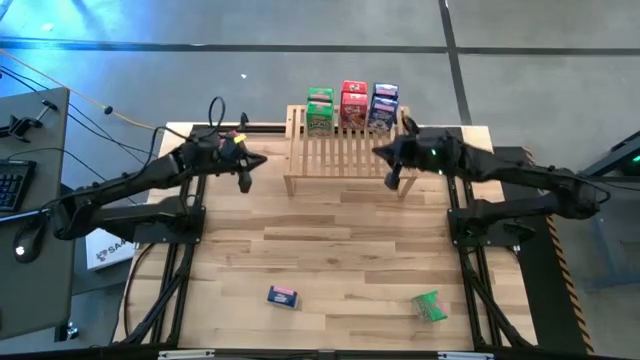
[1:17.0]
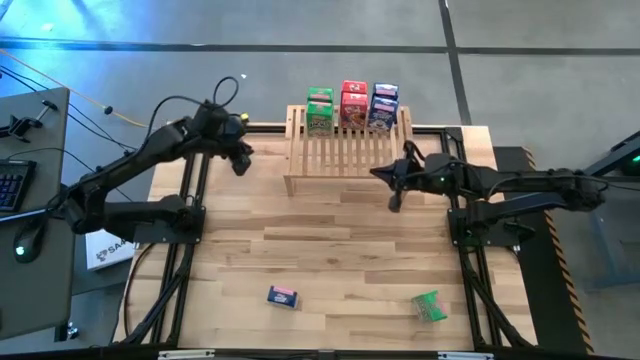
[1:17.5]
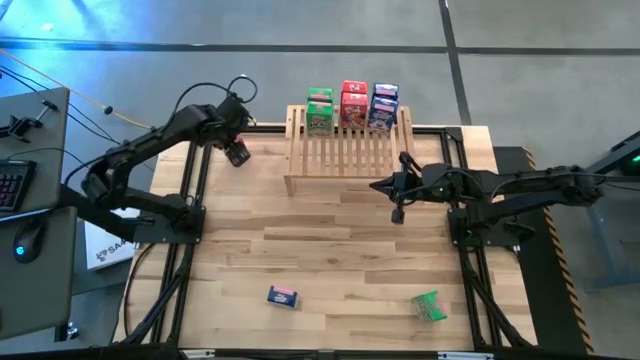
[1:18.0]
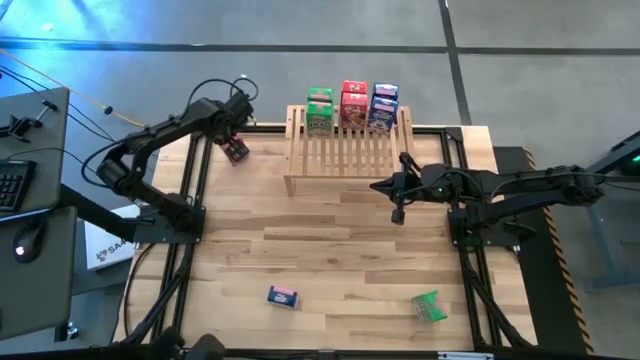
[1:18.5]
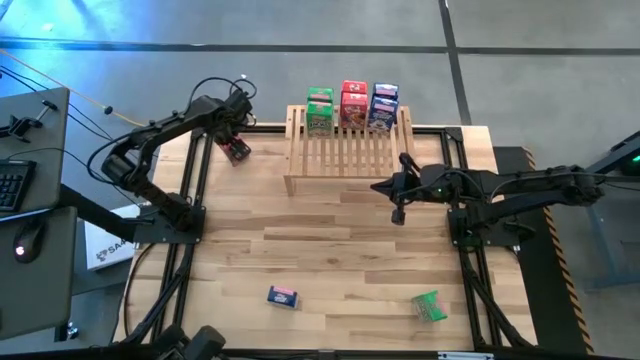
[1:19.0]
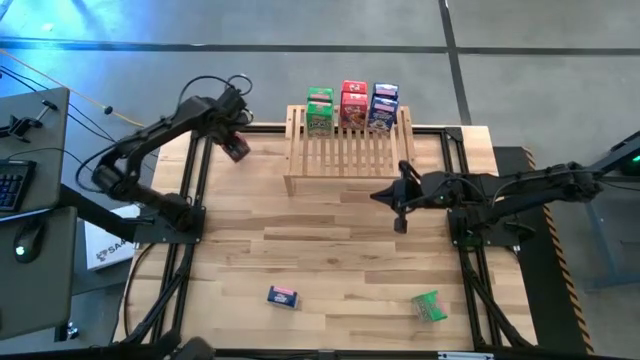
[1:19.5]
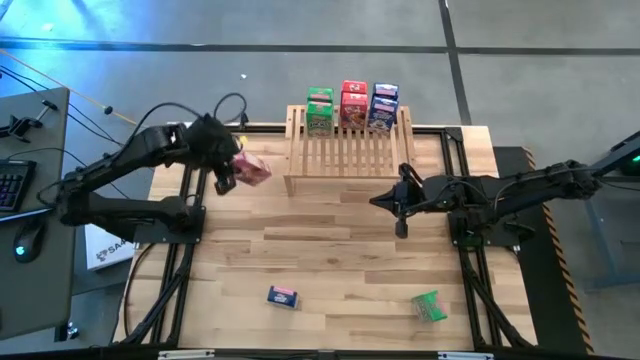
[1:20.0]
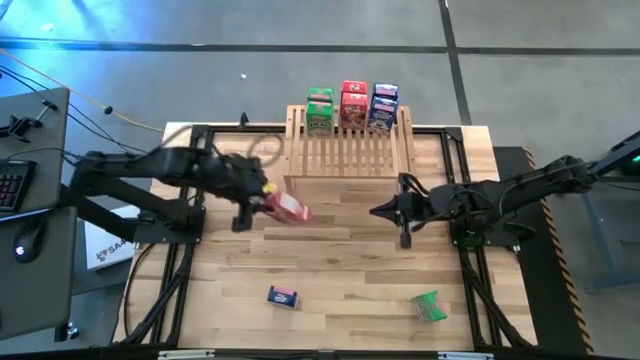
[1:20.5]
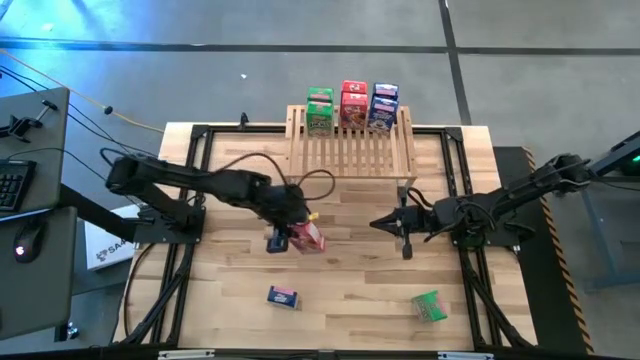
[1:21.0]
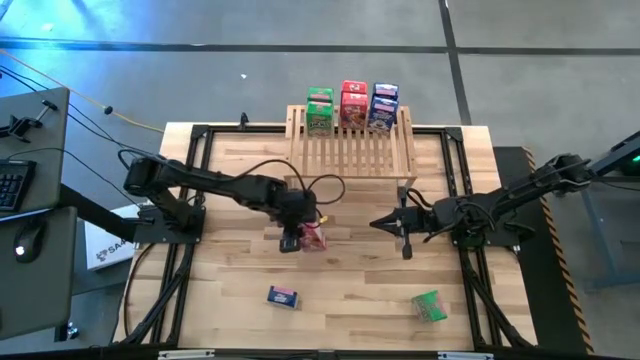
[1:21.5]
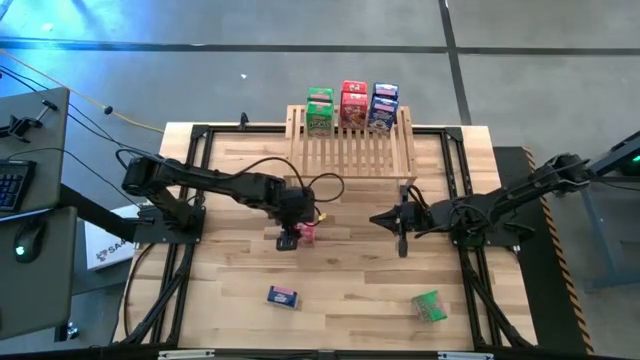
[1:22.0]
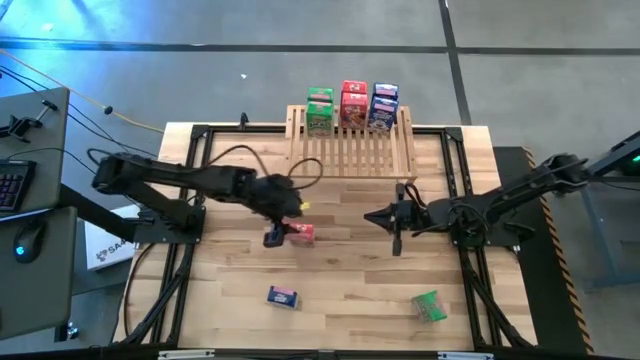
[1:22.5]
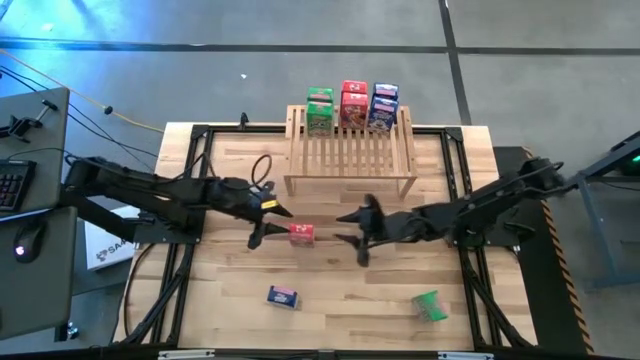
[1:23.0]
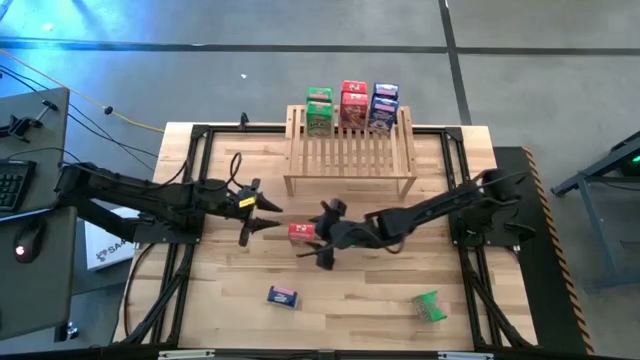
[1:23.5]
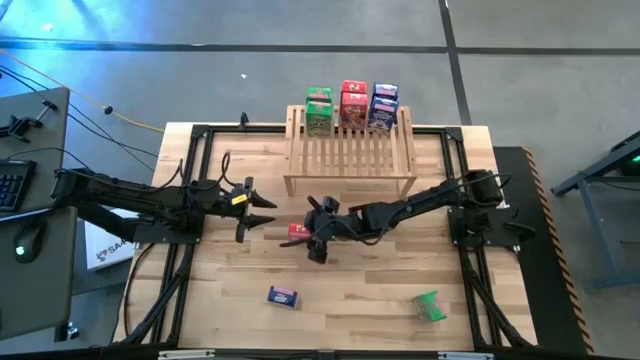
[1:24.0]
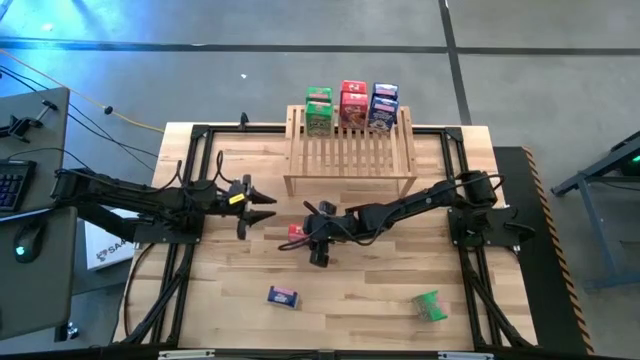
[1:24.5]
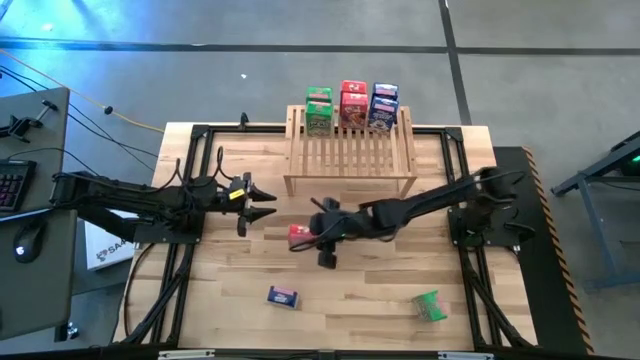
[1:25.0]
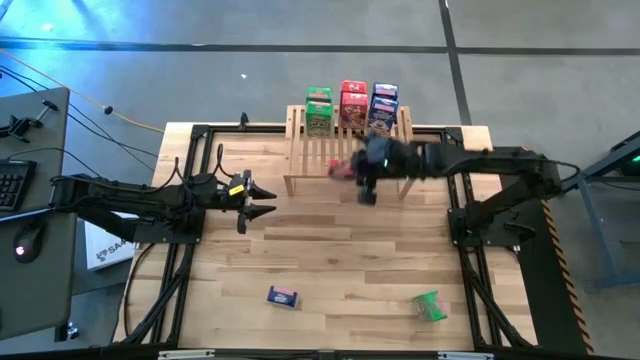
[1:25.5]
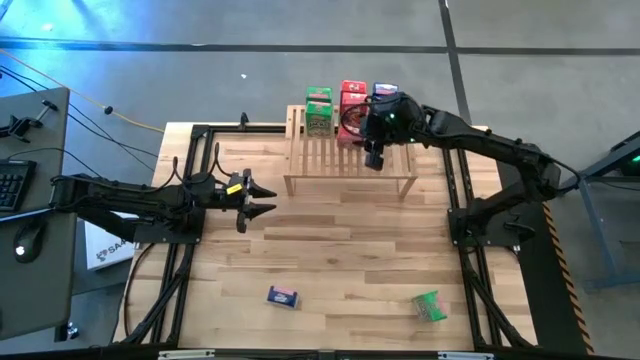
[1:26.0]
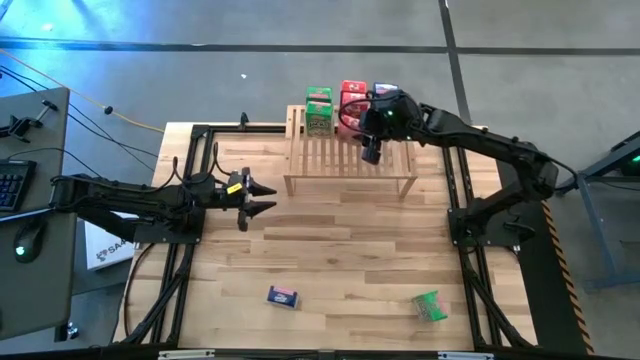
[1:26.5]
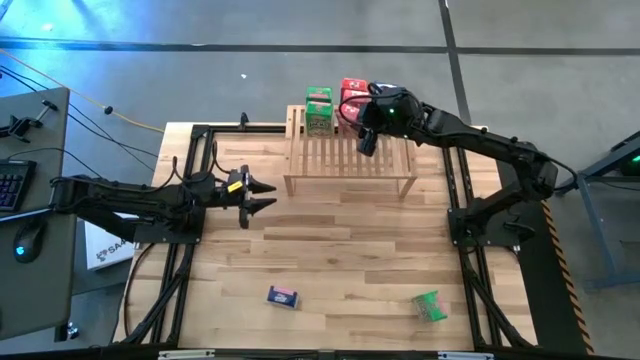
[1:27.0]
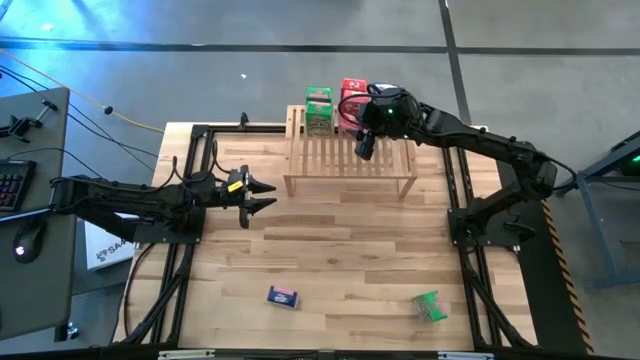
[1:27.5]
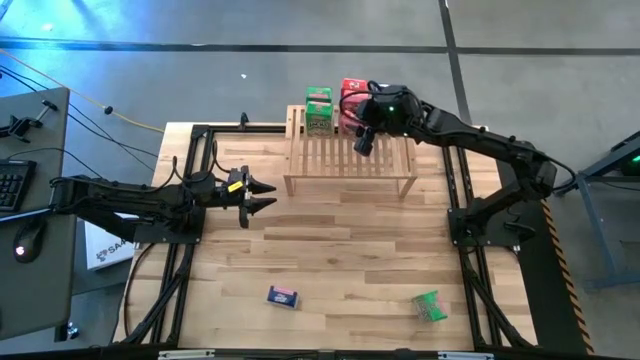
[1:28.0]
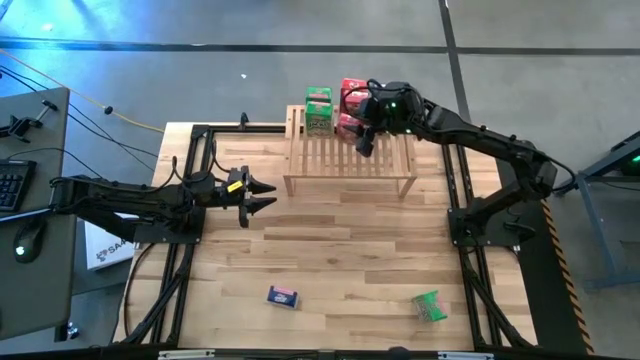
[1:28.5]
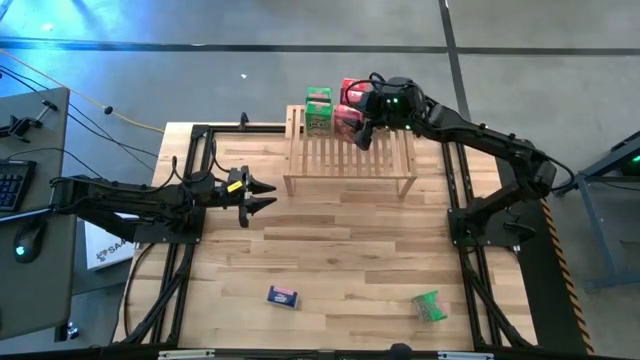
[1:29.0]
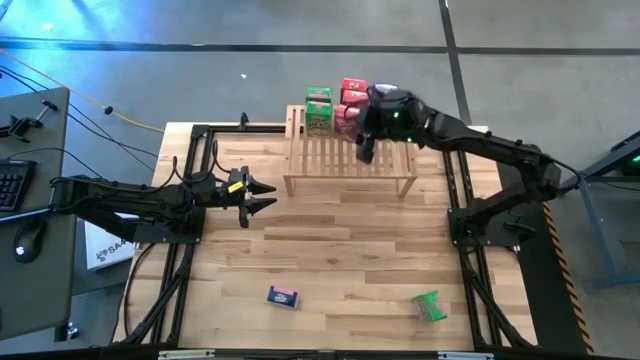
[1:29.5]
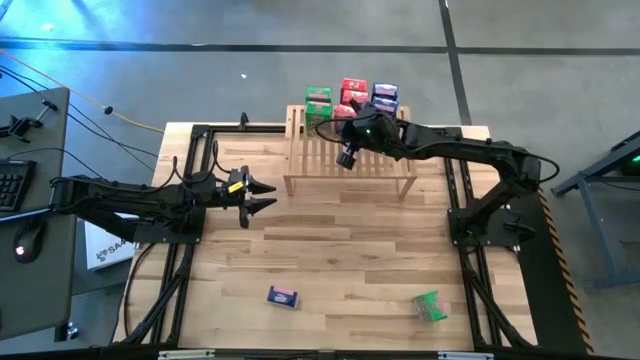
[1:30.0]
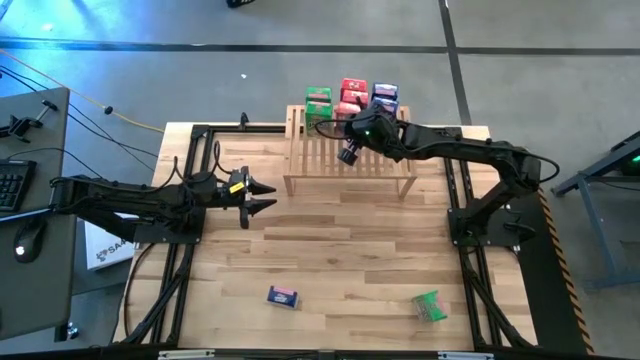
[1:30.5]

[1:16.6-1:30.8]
Task: Stack cereal on shelf
Put the red cereal box on the shelf aligned with the other red cereal boxes

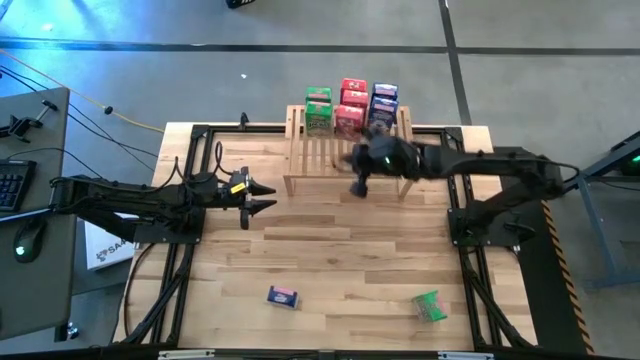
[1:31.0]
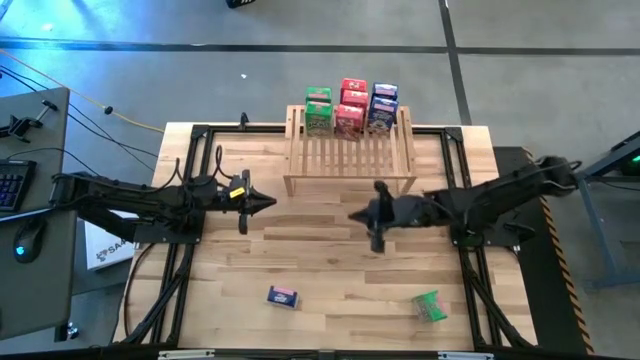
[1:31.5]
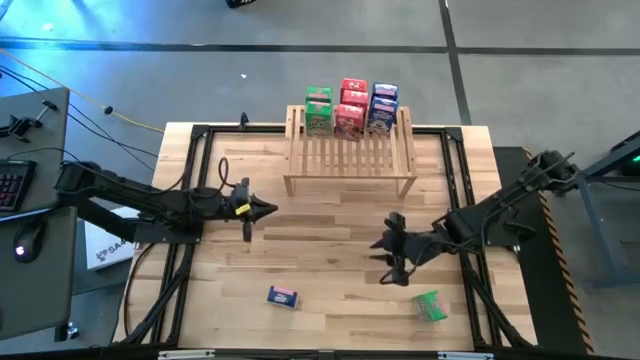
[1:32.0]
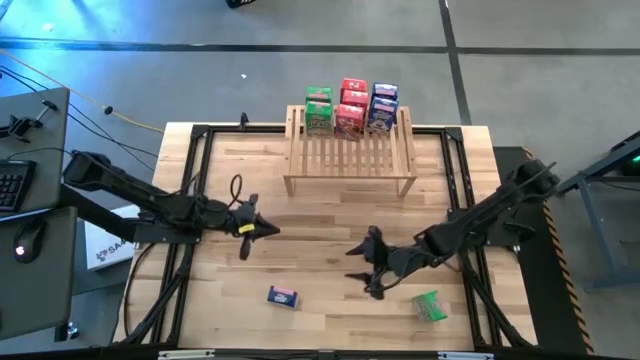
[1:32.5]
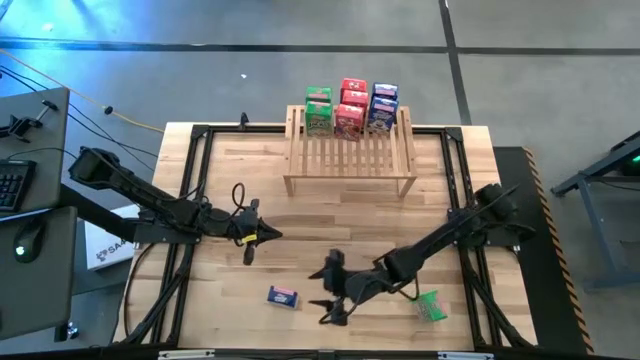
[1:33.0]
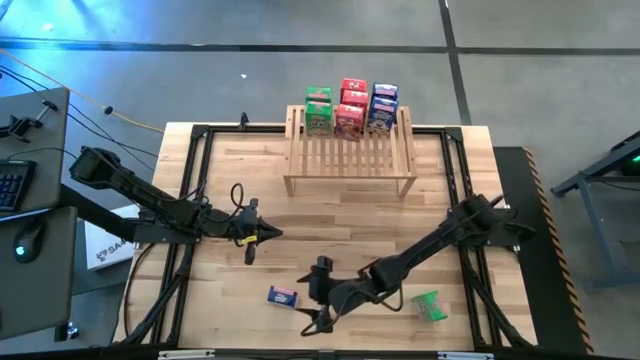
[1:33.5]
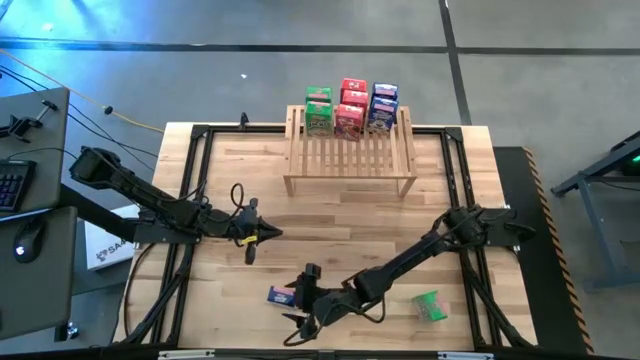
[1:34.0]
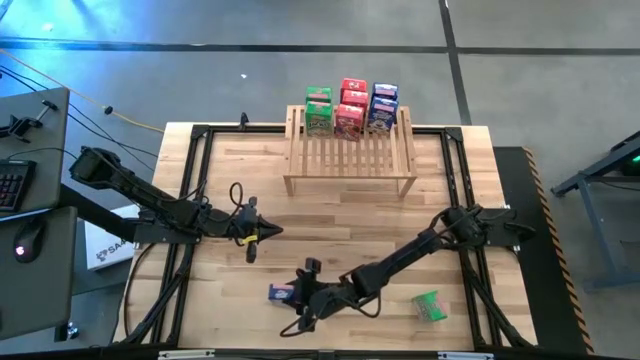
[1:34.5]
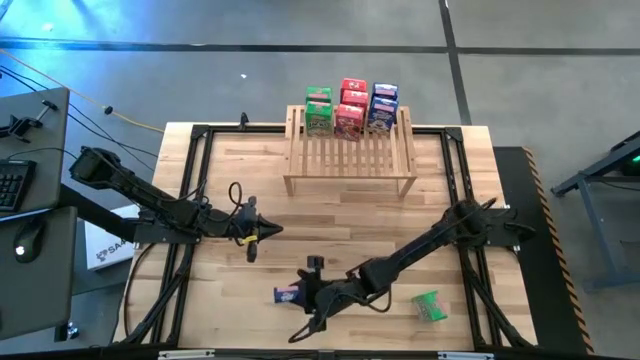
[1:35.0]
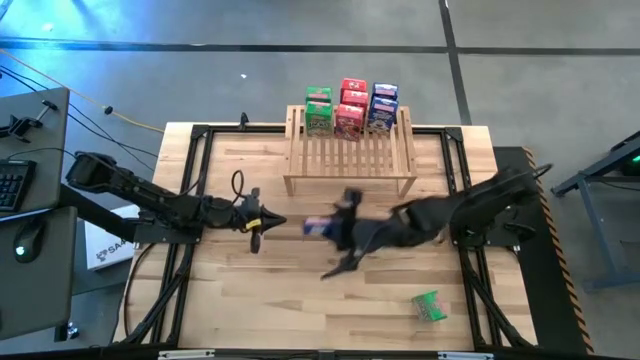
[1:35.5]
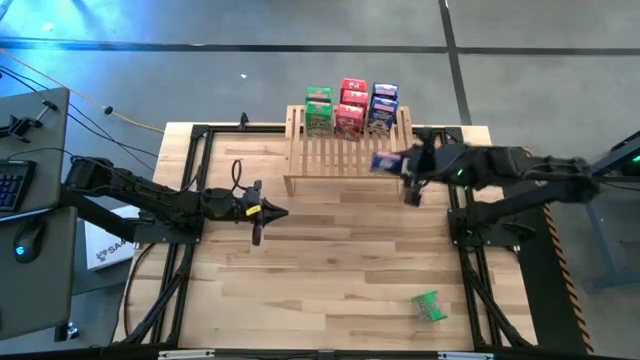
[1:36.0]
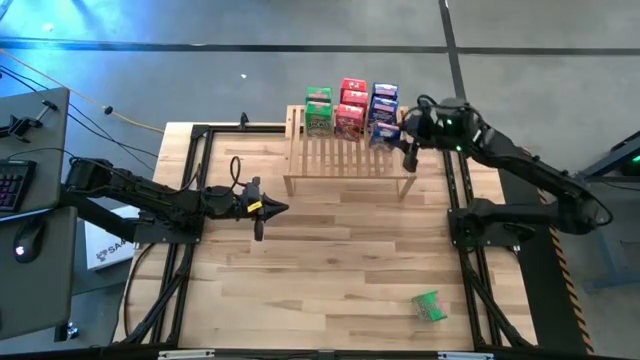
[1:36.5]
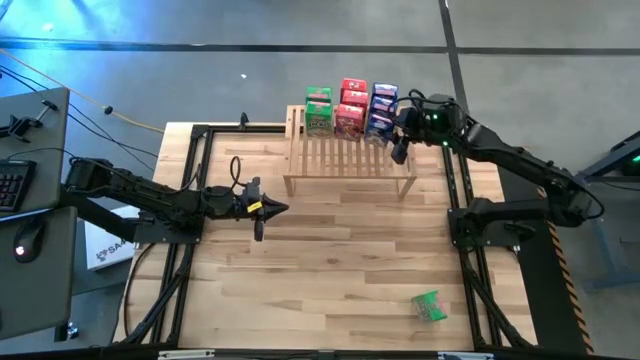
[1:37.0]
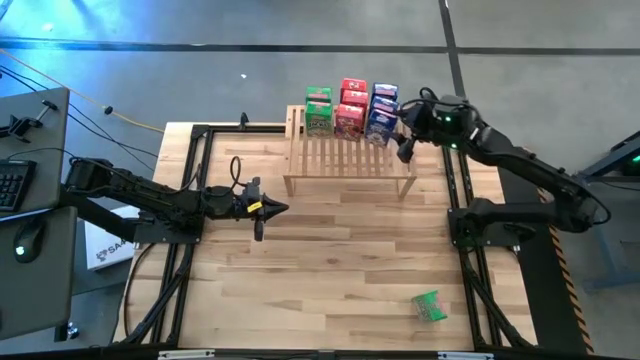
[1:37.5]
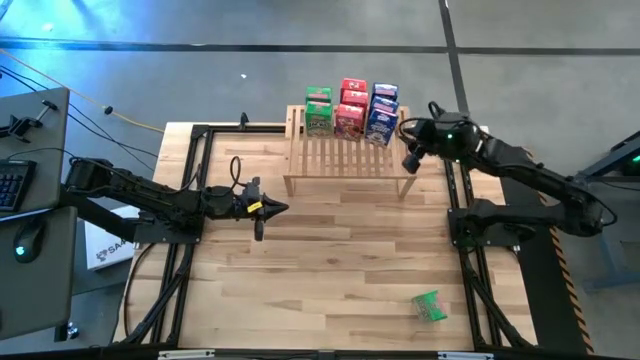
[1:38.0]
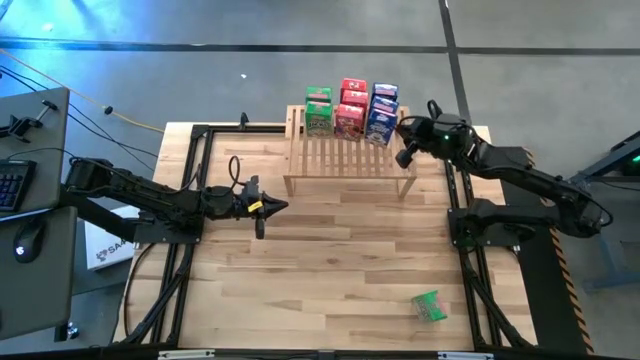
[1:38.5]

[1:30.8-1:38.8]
Put the blue cereal box on the shelf aligned with the other blue cereal boxes
